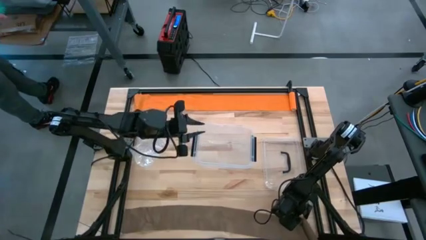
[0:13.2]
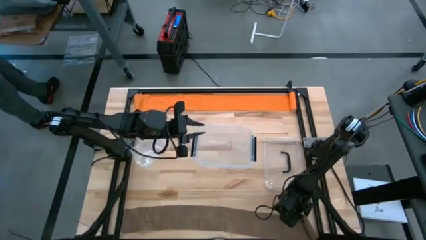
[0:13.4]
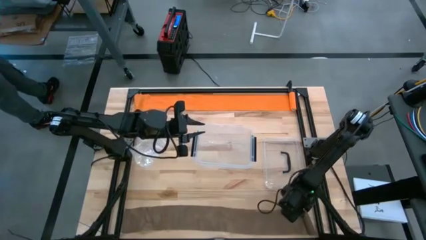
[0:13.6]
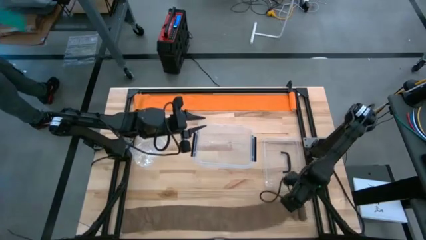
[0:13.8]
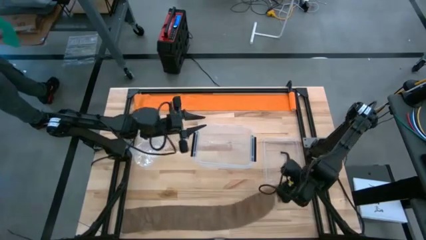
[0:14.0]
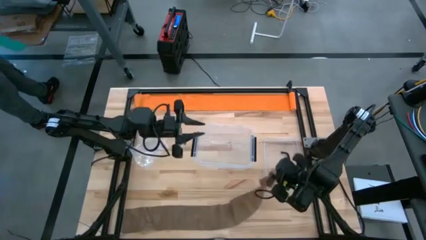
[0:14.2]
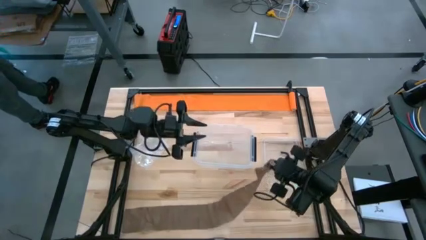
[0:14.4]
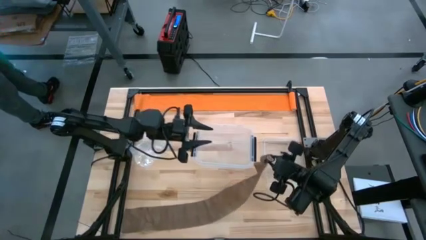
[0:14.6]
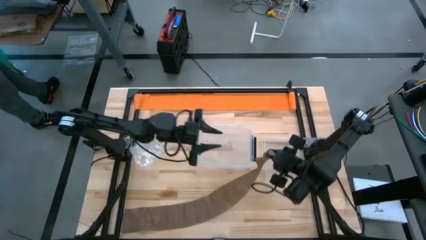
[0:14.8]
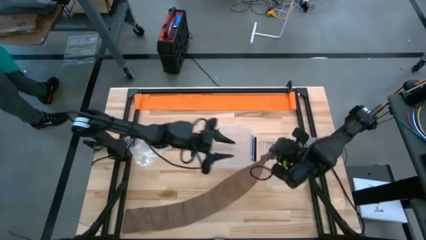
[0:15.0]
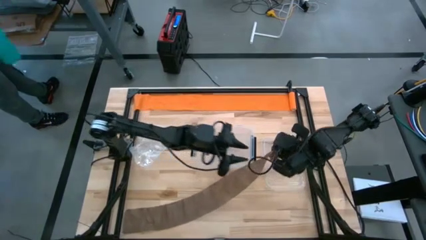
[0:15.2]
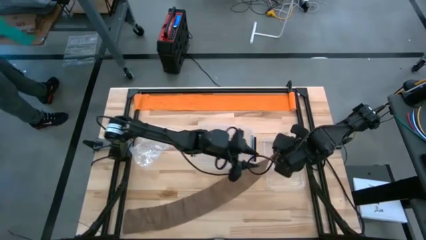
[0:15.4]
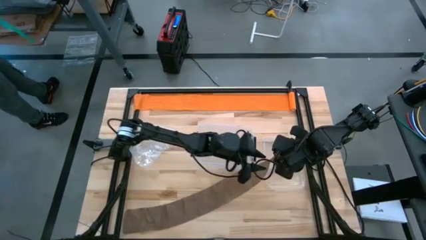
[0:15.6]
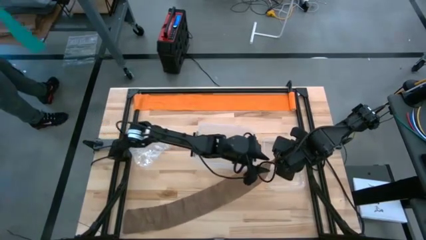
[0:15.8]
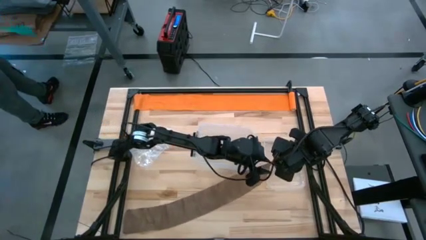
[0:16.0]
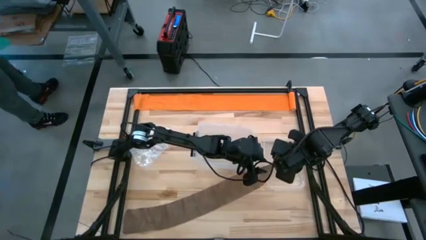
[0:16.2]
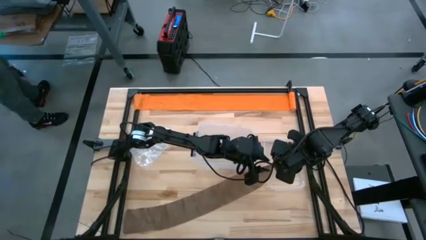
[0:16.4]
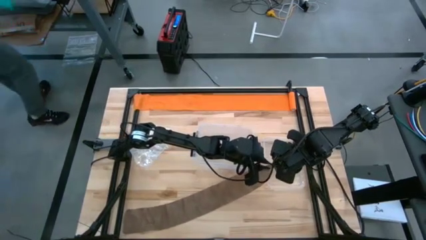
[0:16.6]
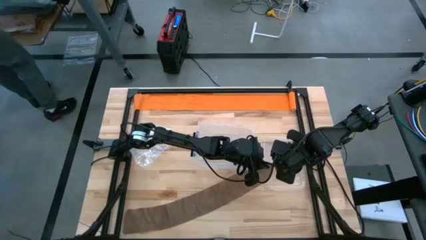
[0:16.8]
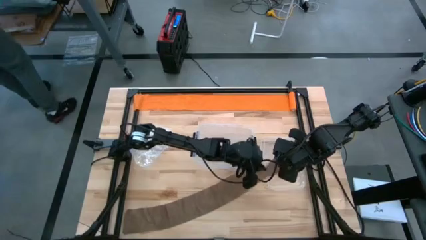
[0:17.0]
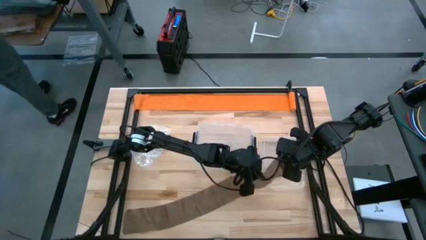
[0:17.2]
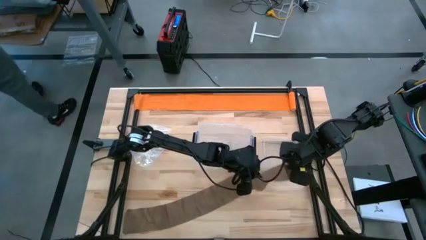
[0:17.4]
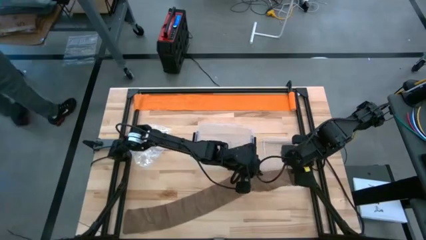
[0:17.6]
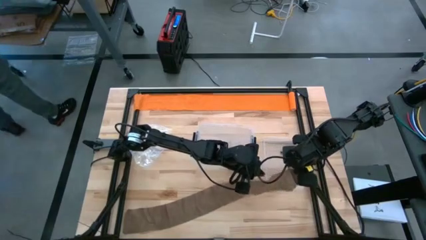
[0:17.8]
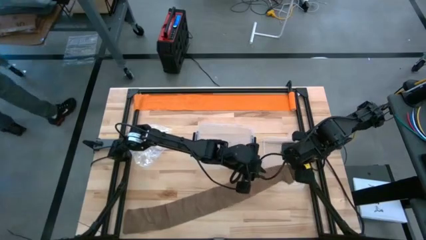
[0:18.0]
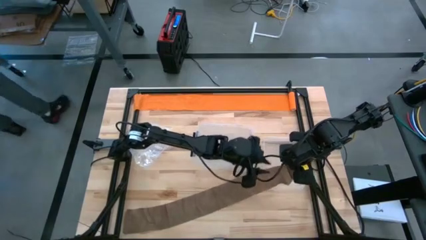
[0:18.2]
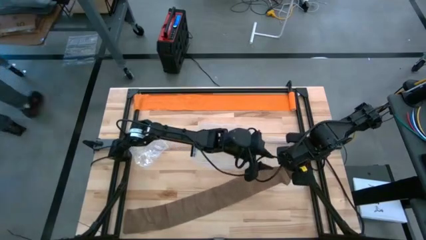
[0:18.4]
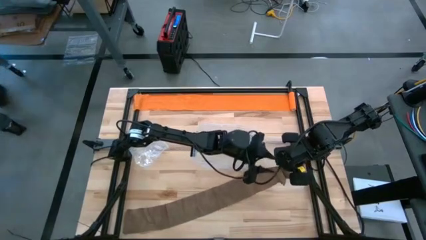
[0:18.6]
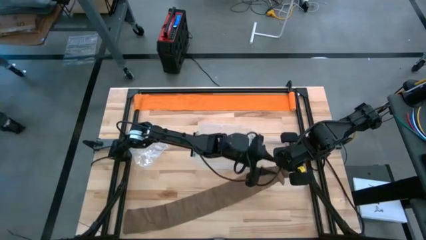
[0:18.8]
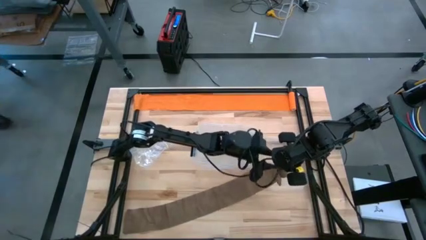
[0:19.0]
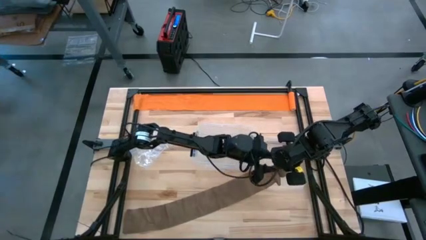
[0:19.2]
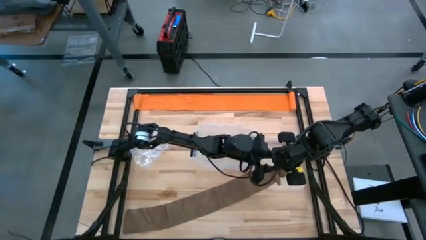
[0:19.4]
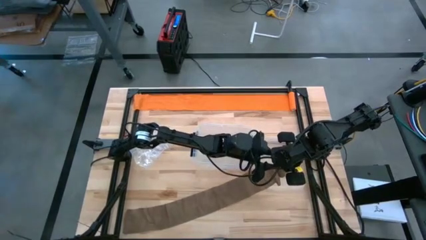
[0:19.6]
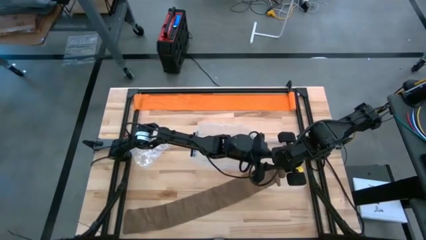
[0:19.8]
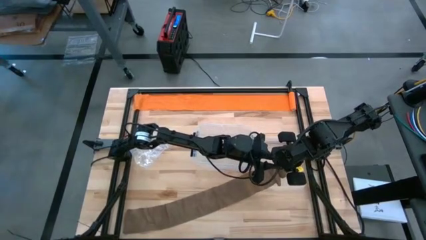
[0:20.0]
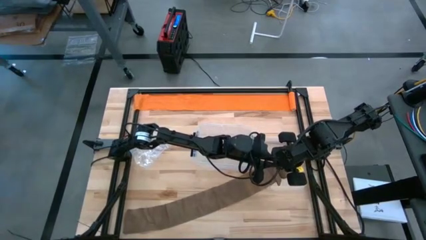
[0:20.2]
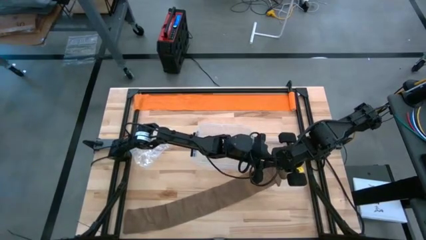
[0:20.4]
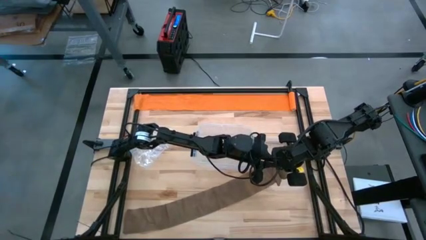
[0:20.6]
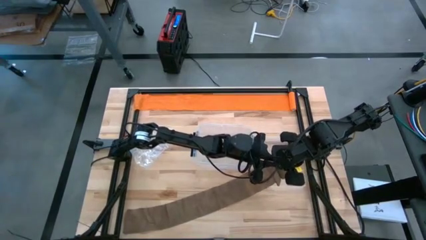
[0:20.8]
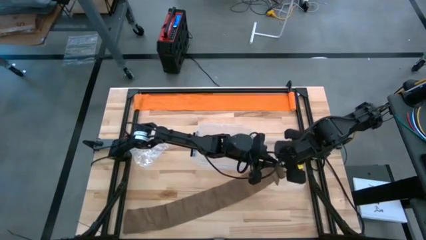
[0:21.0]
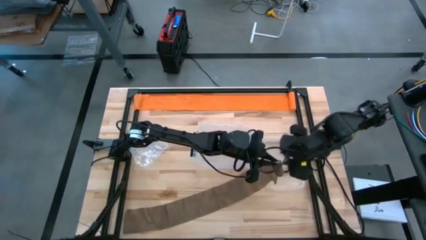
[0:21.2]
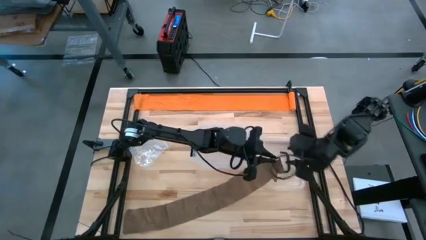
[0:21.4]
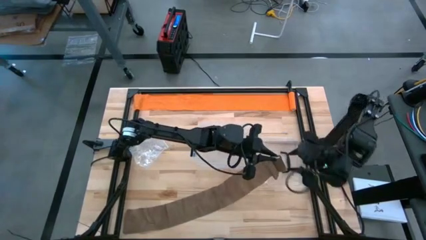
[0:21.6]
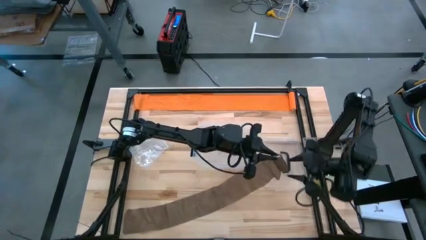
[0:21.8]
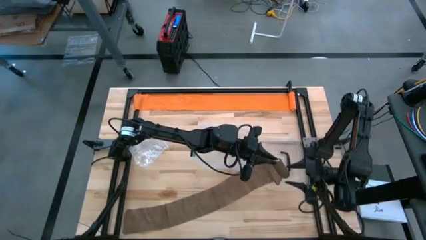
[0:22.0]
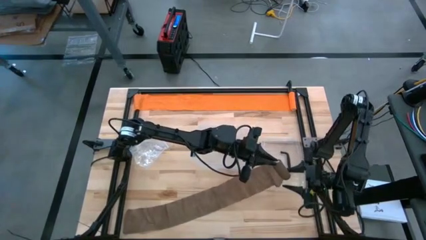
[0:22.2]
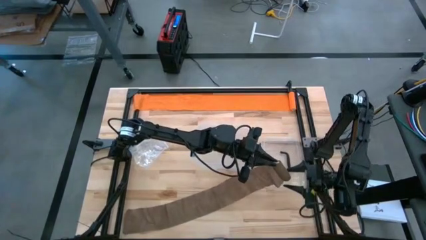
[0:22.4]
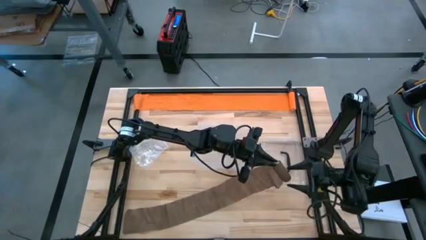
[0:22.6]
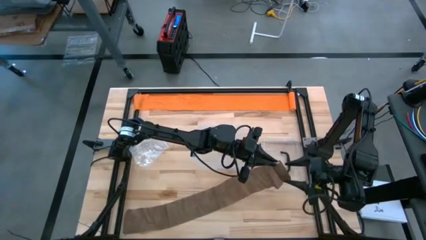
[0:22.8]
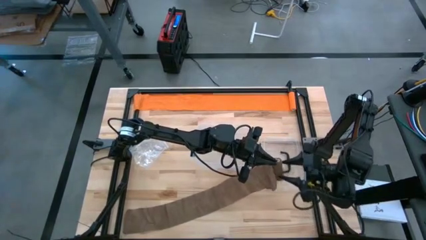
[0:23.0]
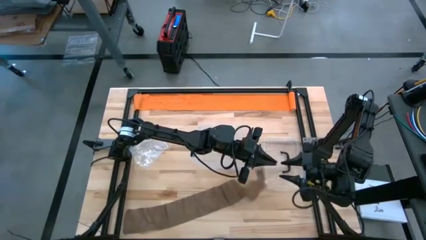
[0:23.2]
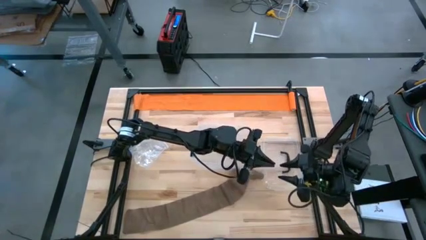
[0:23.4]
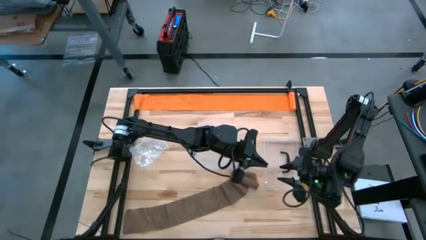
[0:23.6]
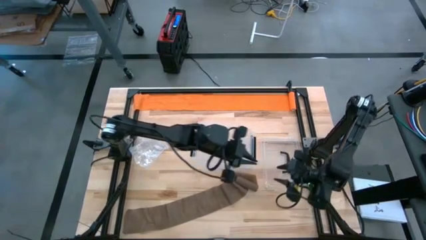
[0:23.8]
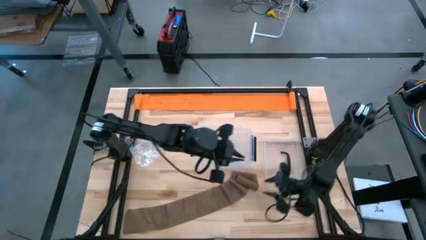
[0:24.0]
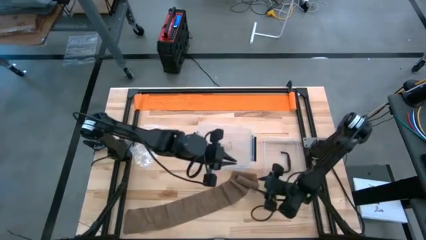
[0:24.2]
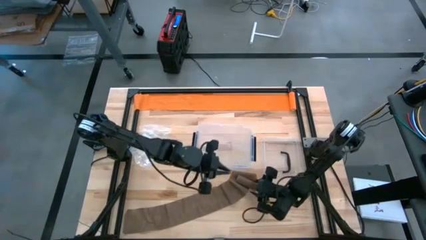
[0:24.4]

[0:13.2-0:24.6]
Task: Roll bandage
Roll the brown bandage
